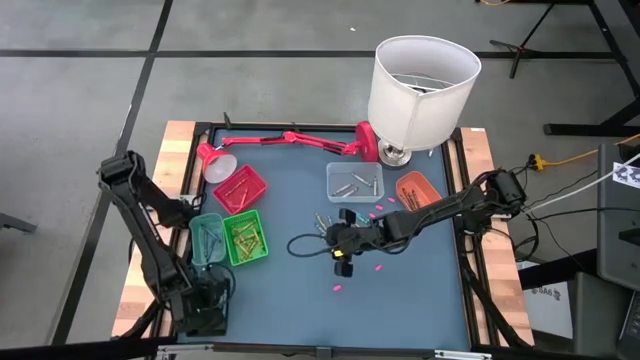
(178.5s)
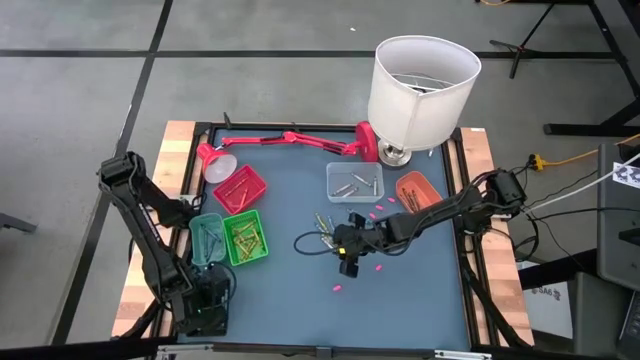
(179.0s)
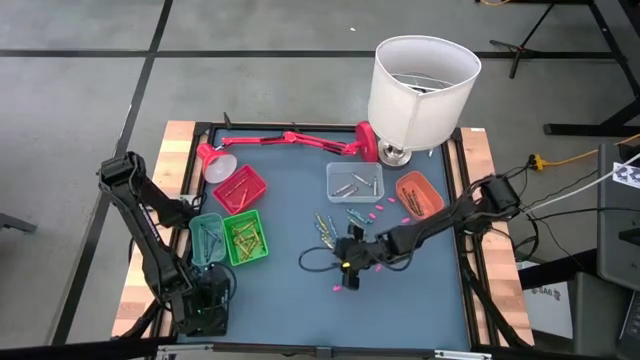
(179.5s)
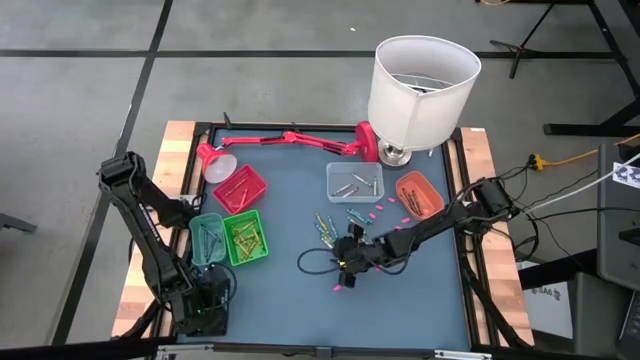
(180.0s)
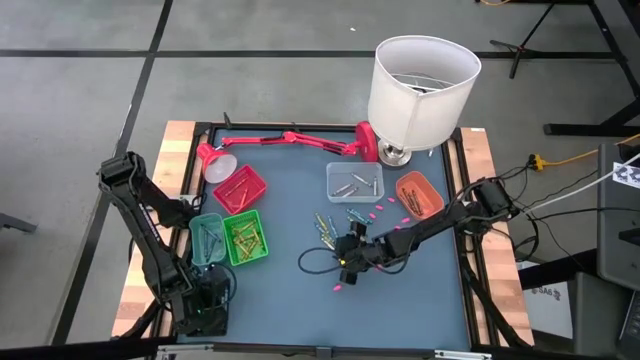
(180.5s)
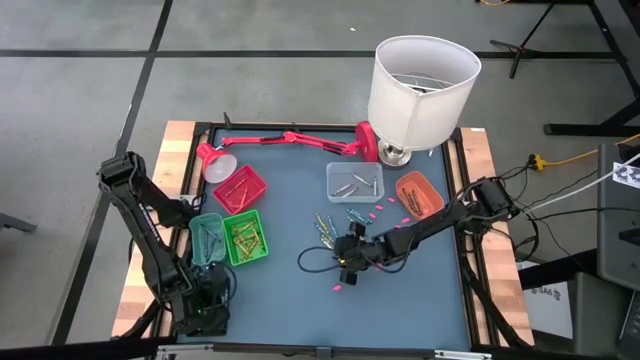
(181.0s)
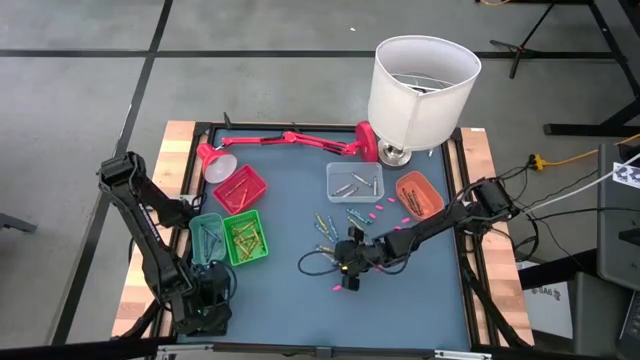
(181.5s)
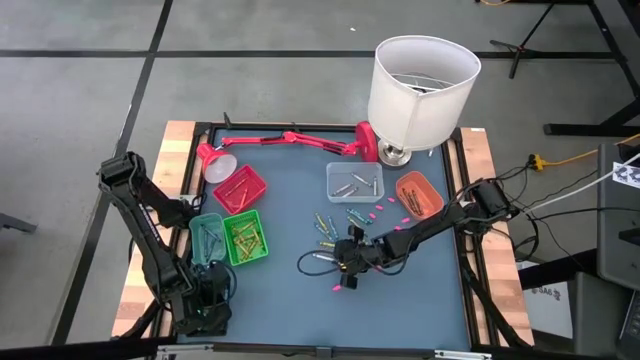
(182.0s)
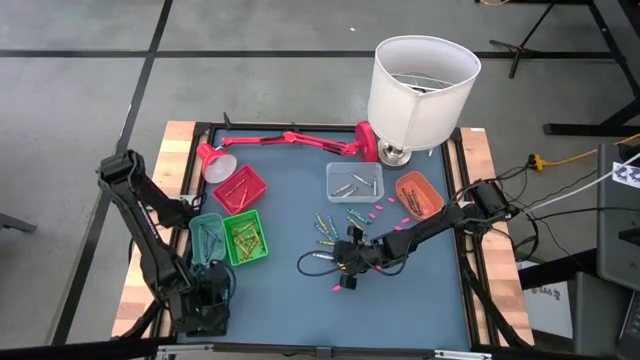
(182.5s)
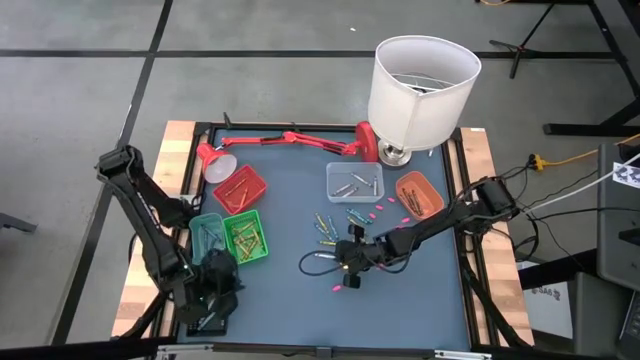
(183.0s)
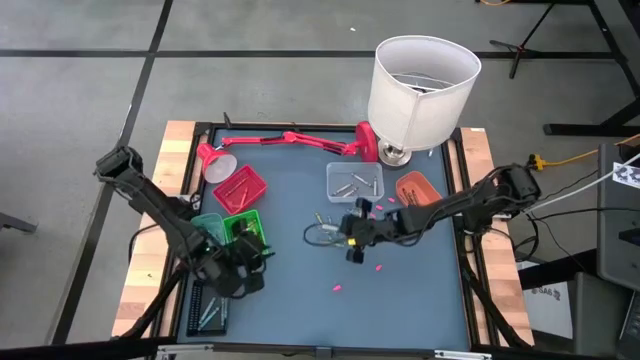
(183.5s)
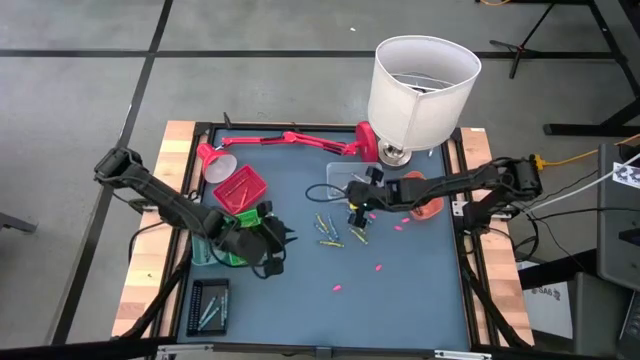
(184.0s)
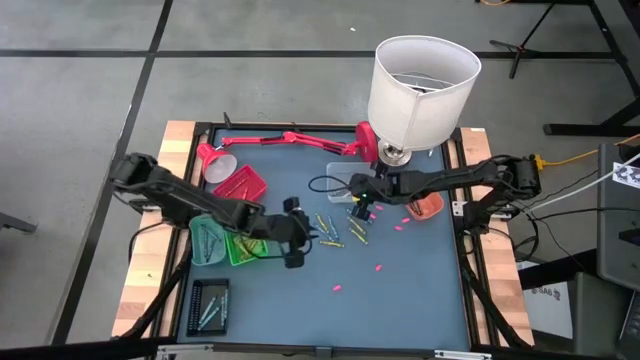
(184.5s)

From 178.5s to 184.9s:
Task: Sort crayons
Put the gray crayon into the transparent bin

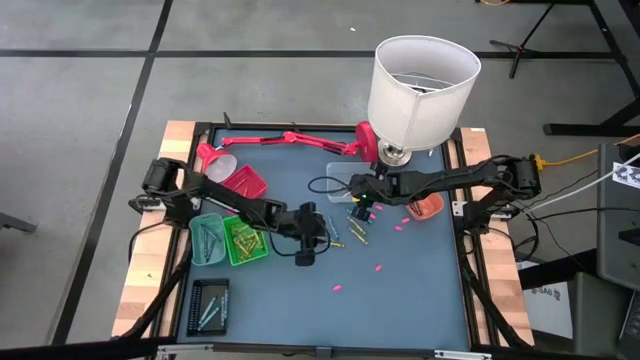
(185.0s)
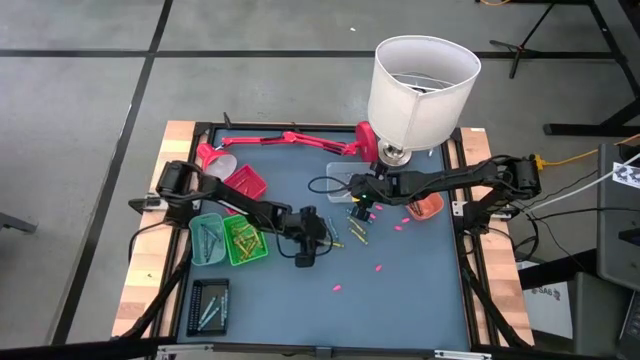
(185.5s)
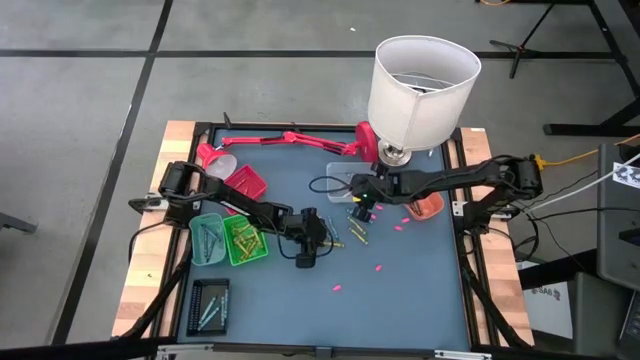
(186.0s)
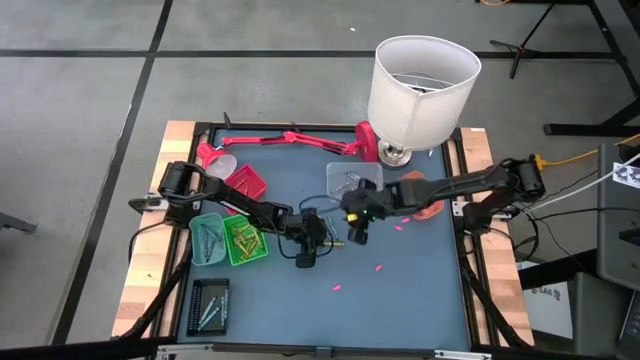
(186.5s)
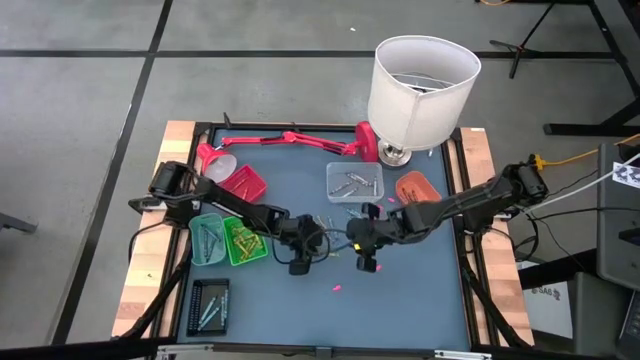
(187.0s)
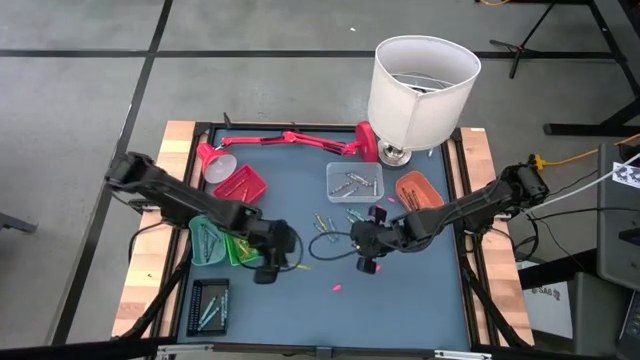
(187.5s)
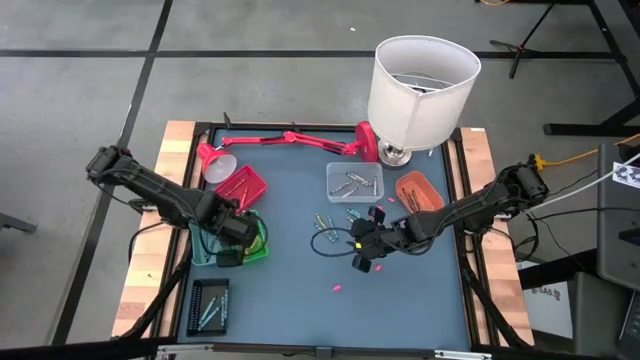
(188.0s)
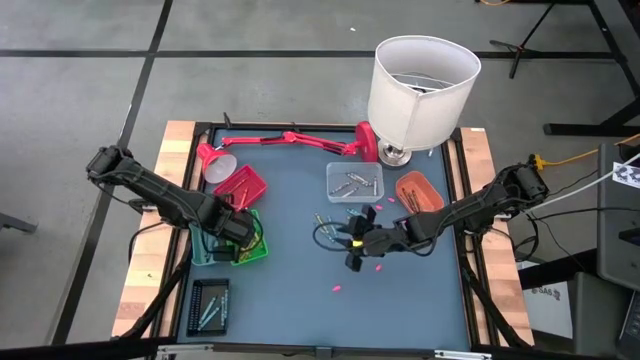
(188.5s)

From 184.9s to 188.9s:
Put the green crayon into the green bin

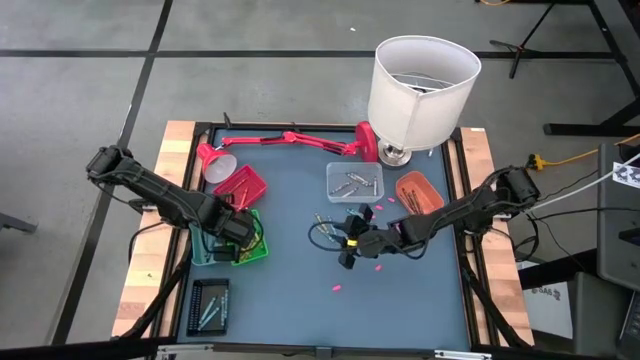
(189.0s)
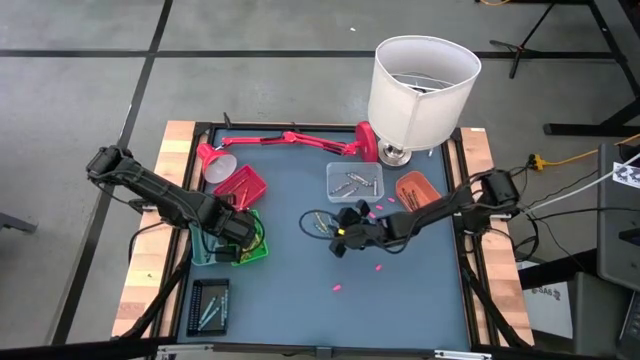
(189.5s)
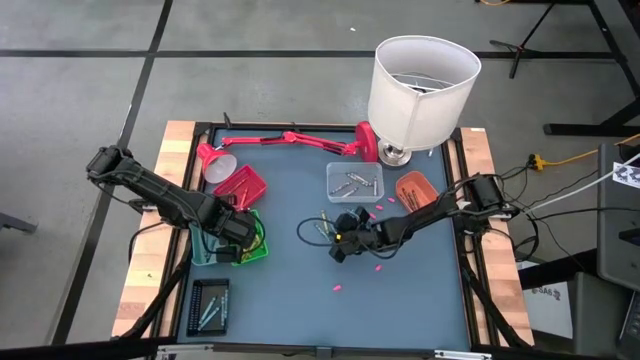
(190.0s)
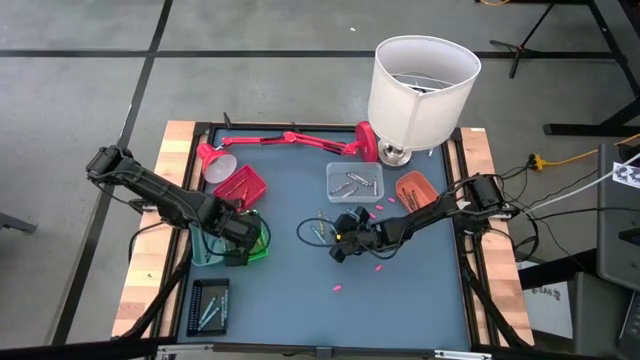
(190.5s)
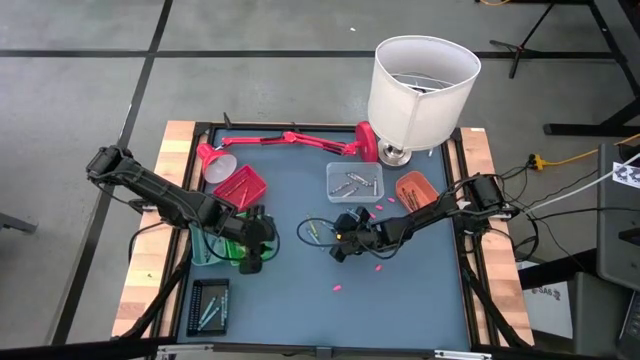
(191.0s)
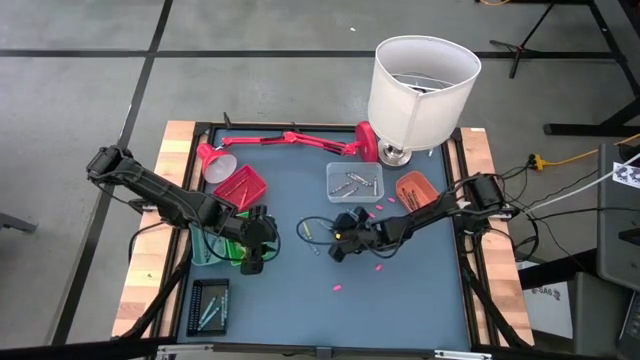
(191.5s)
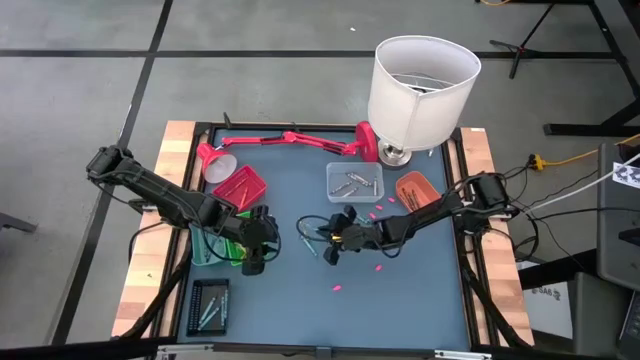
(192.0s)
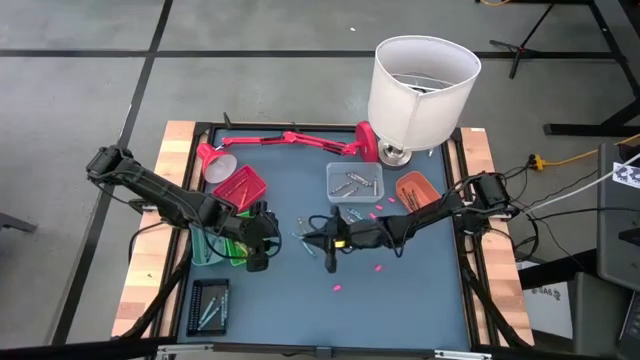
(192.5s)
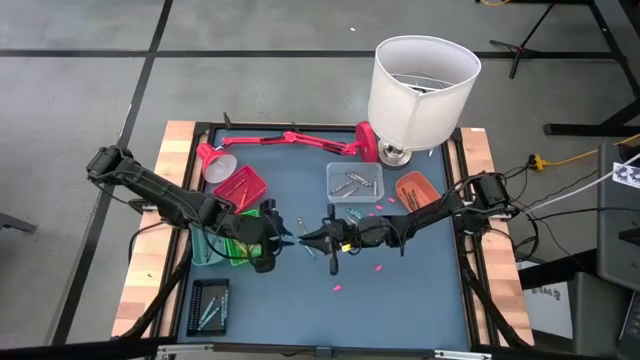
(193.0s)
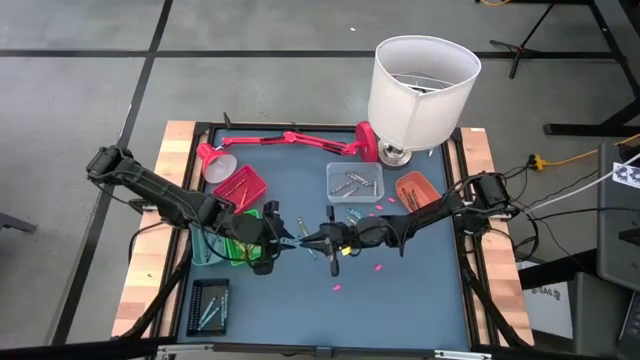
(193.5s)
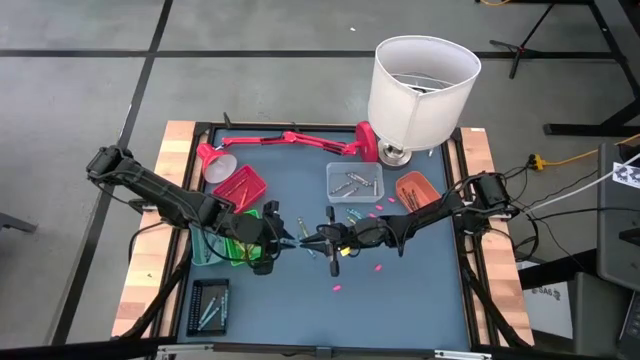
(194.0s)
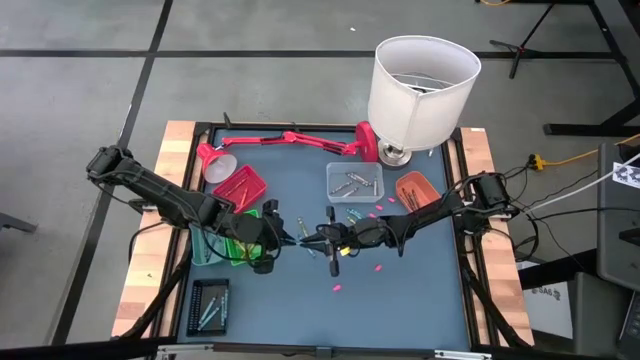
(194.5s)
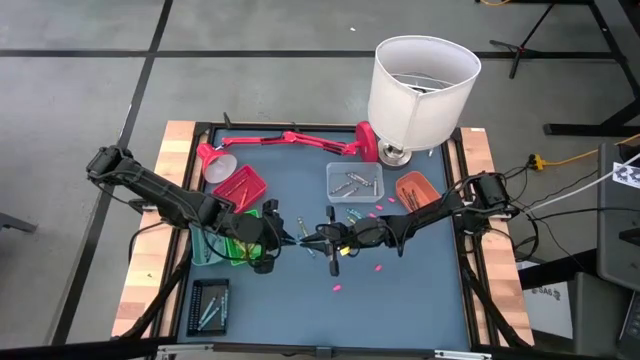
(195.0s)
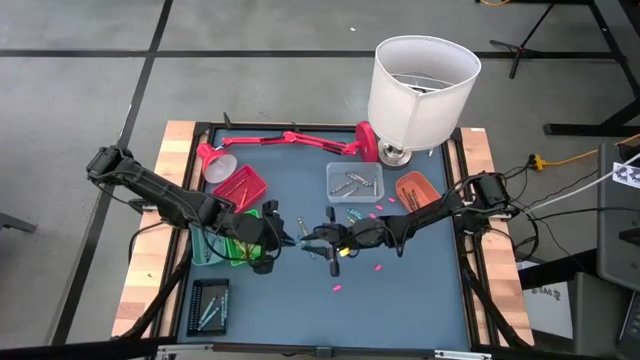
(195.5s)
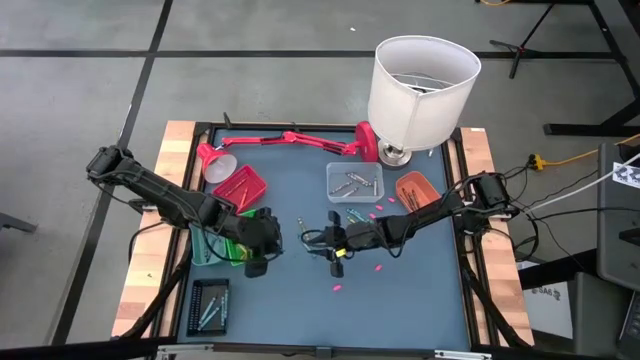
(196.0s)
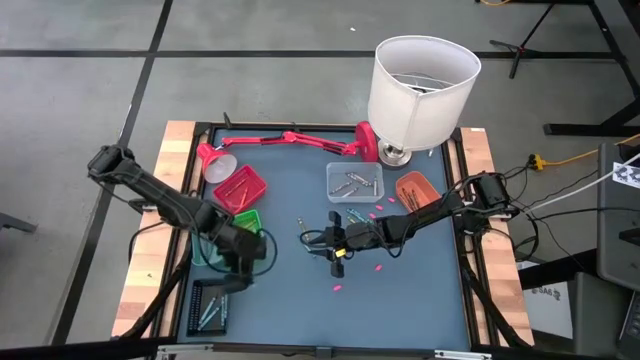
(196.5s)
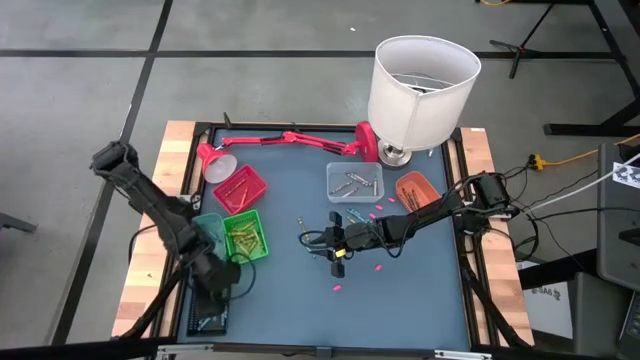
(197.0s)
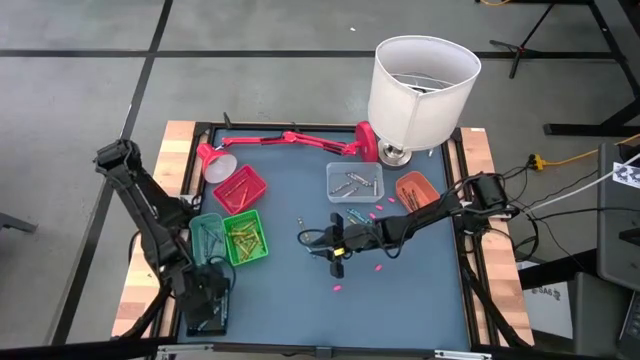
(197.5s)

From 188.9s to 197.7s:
Put the dark green crayon into the black bin

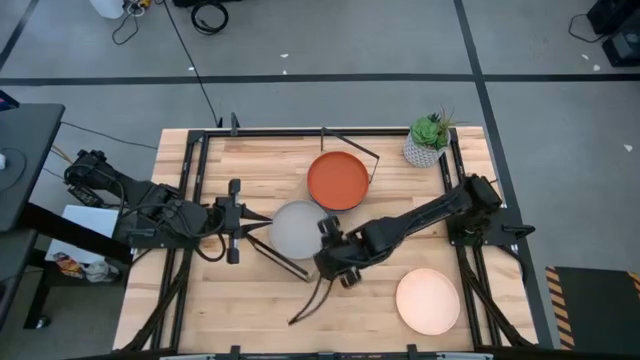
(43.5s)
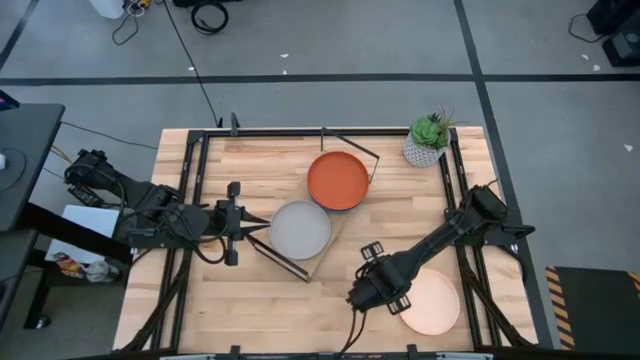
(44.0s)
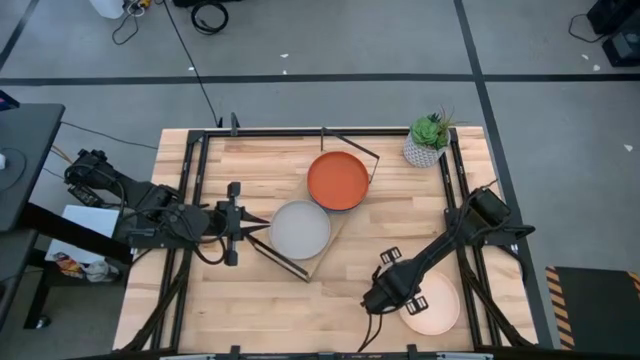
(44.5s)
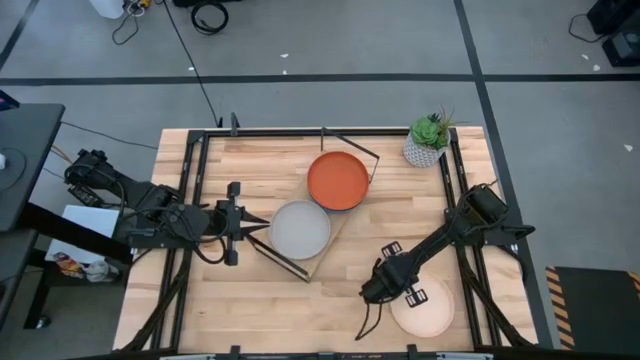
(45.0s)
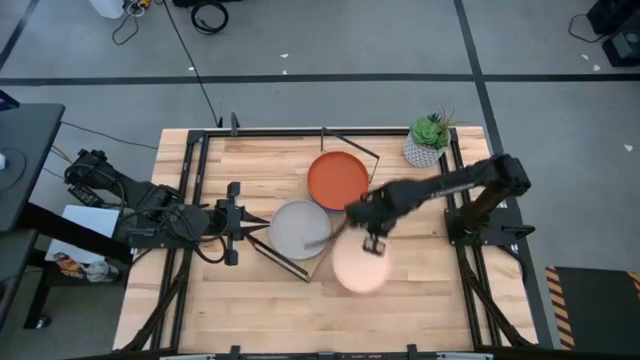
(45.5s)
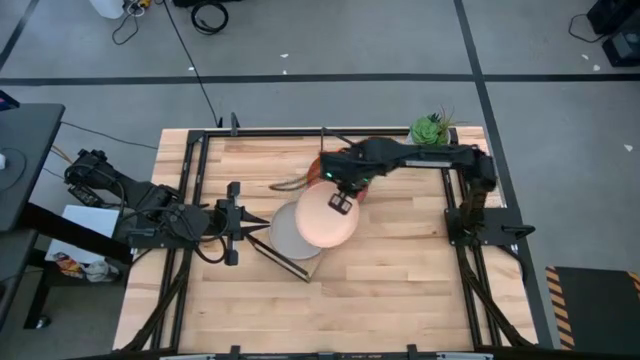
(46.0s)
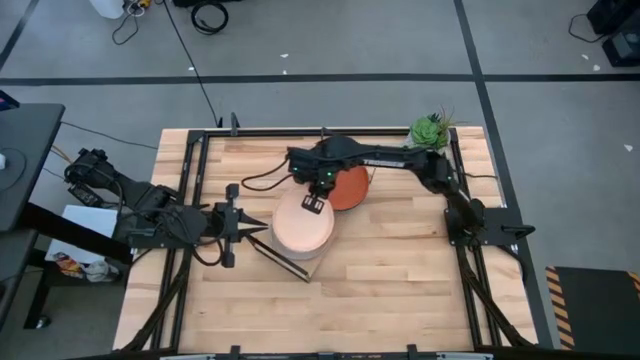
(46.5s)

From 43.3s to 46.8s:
Task: Place and stack plates onto a shelf
Stack the peach plate on top of the gray plate on the shelf
